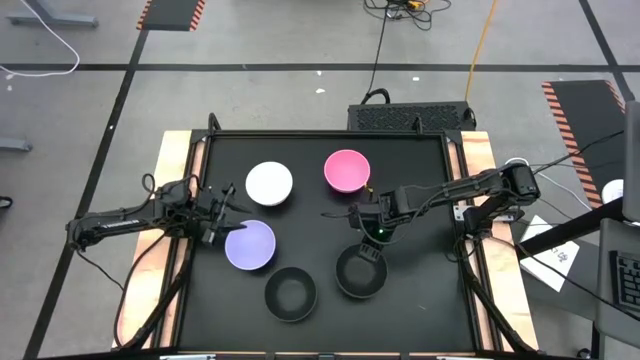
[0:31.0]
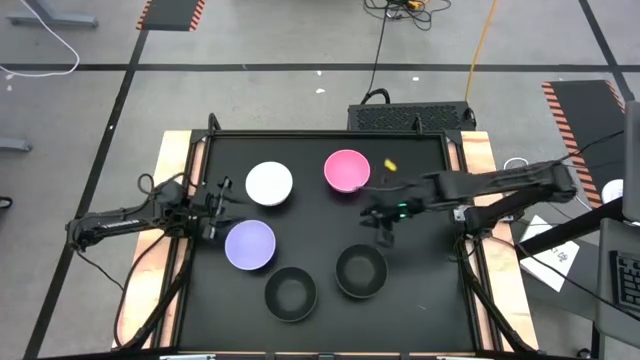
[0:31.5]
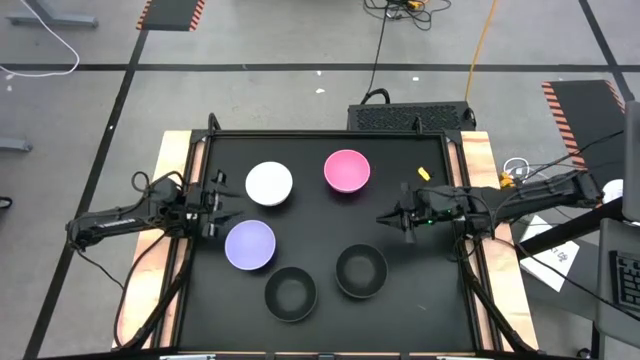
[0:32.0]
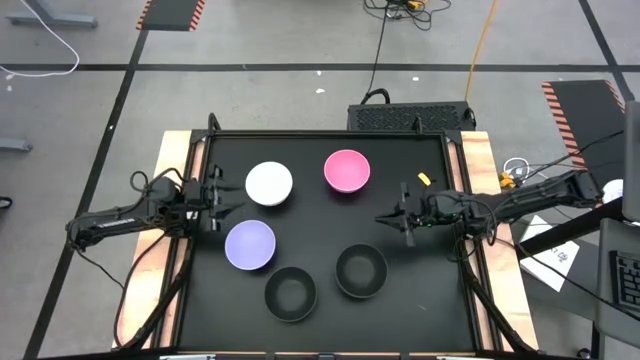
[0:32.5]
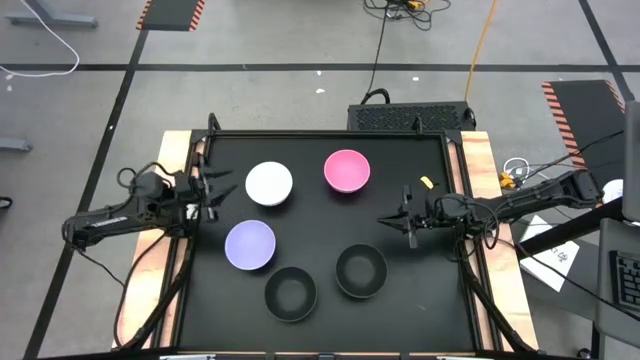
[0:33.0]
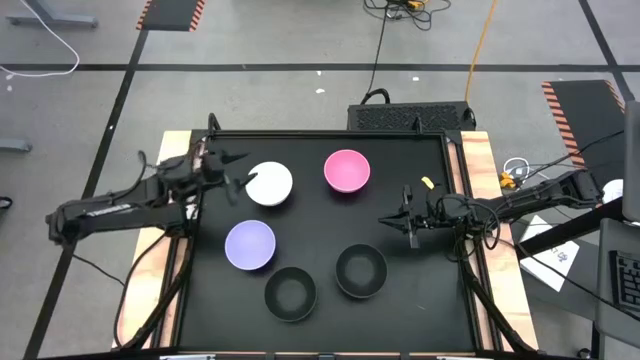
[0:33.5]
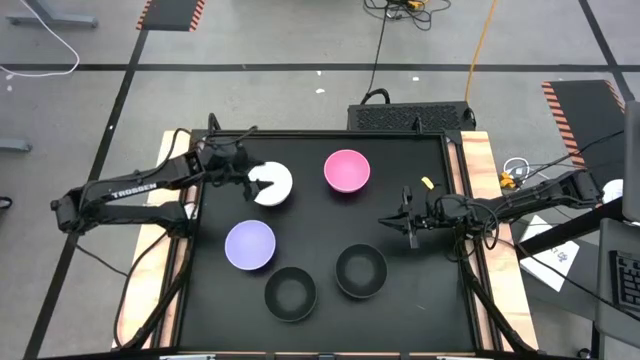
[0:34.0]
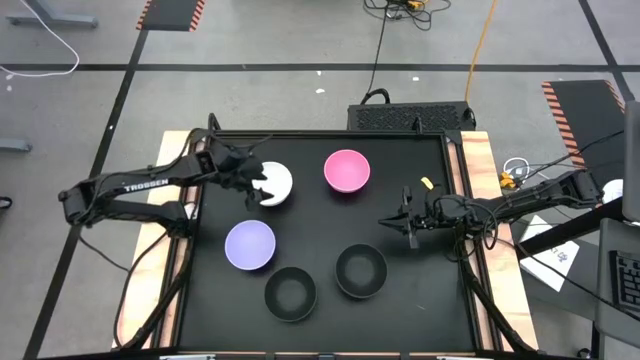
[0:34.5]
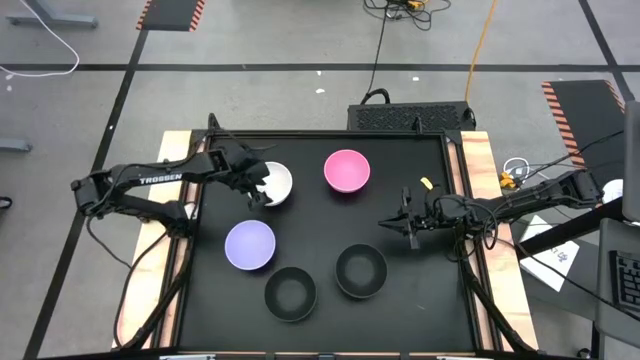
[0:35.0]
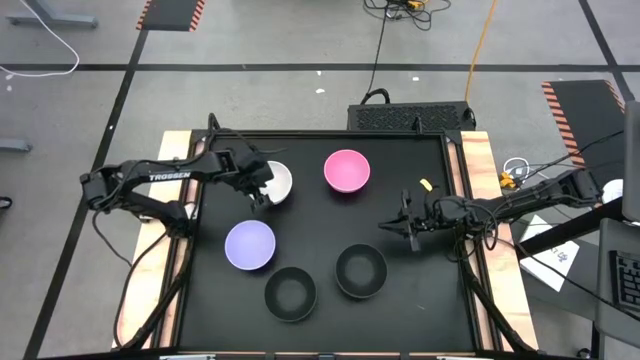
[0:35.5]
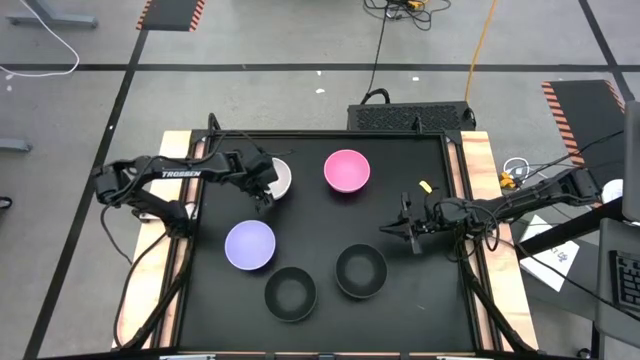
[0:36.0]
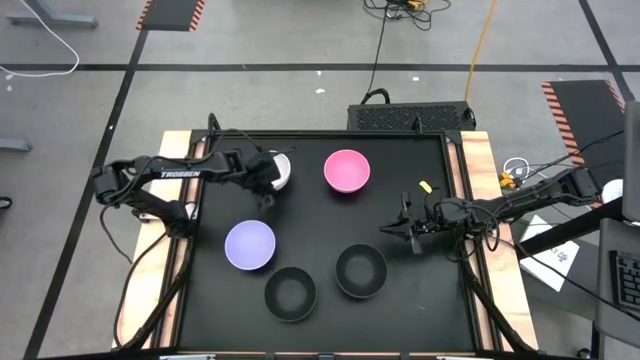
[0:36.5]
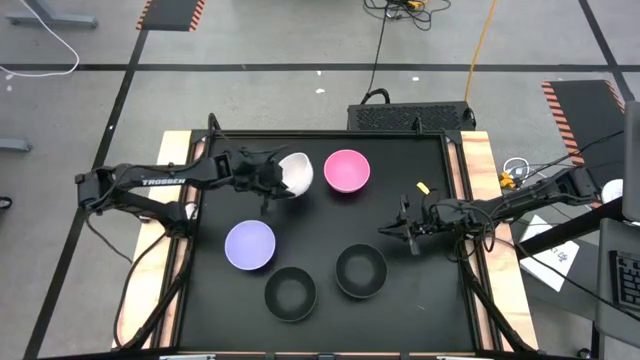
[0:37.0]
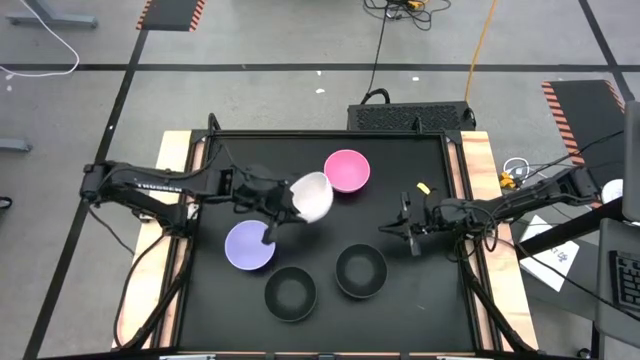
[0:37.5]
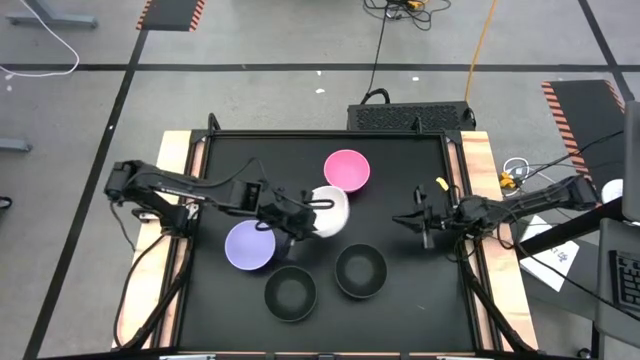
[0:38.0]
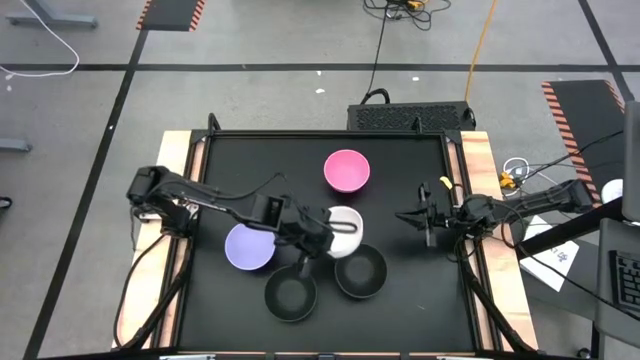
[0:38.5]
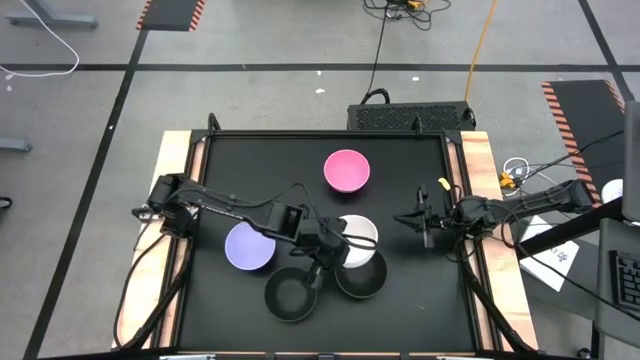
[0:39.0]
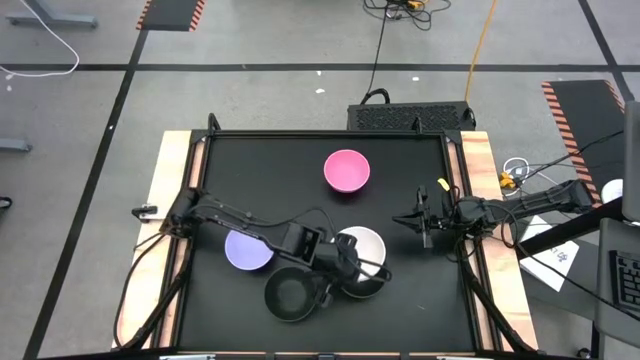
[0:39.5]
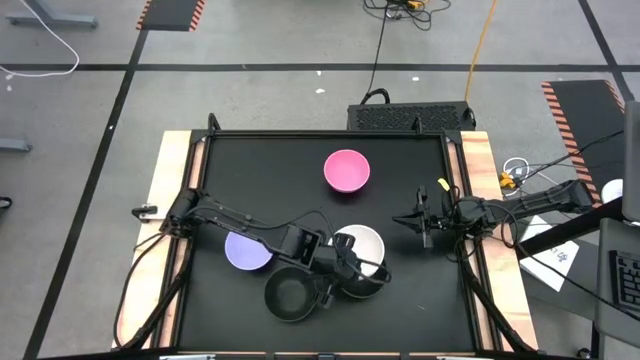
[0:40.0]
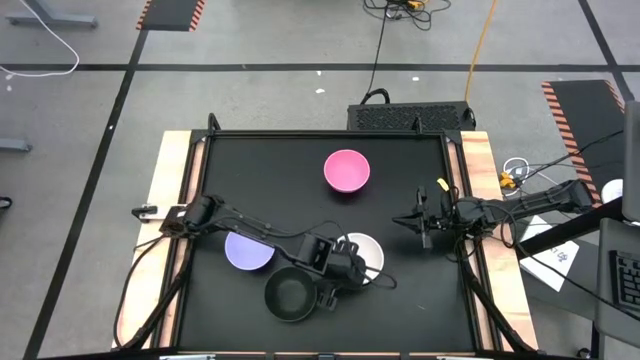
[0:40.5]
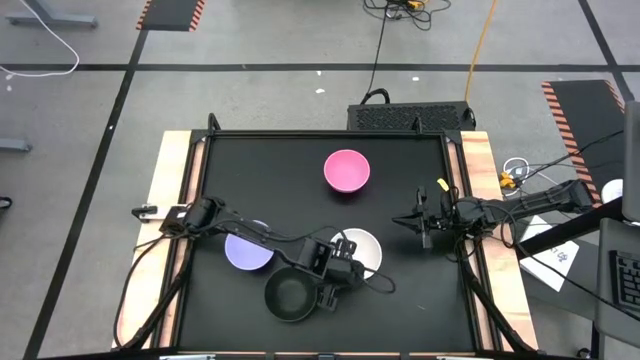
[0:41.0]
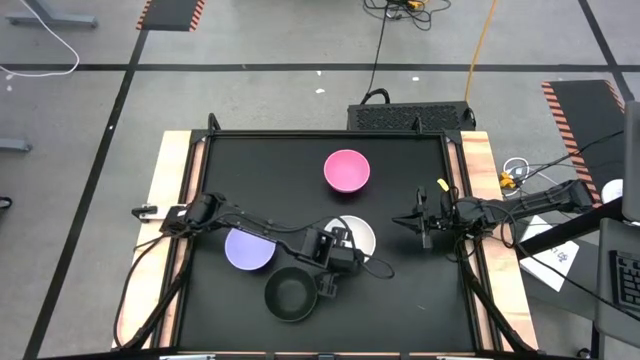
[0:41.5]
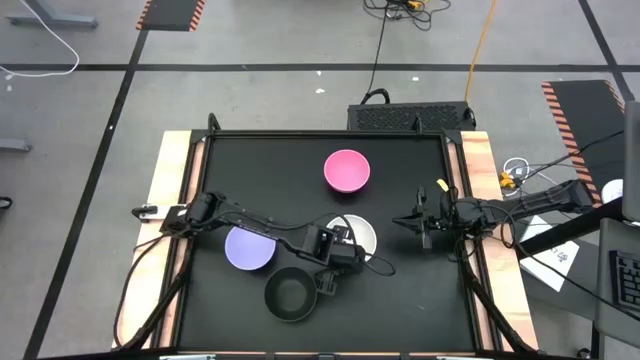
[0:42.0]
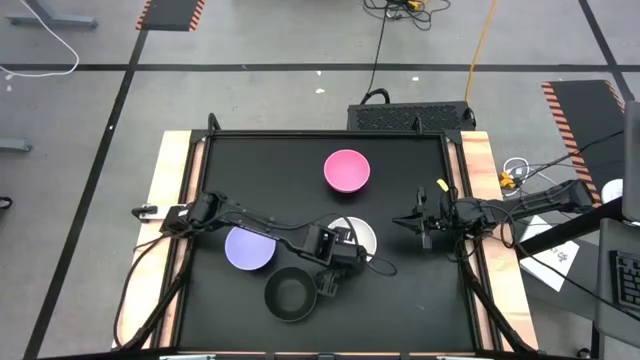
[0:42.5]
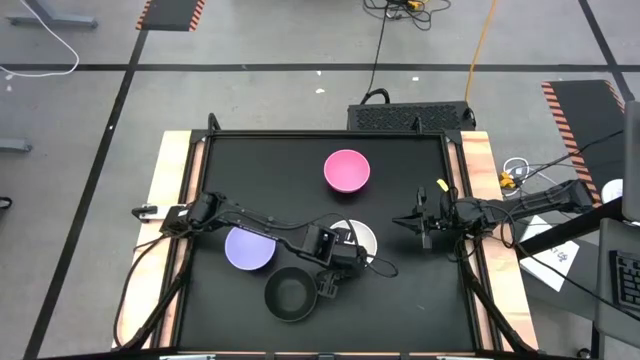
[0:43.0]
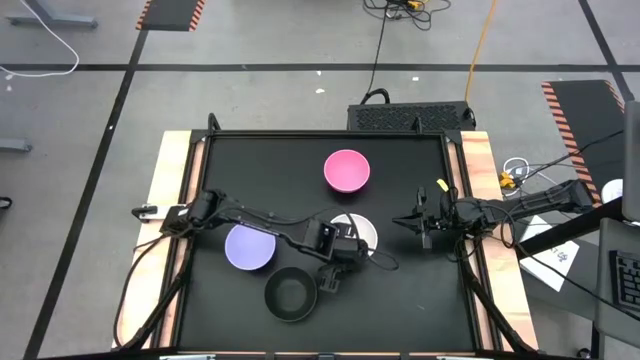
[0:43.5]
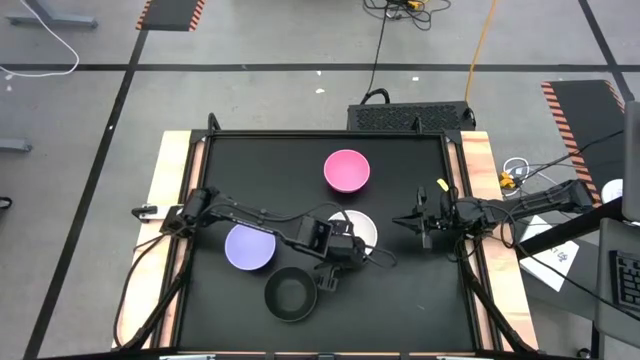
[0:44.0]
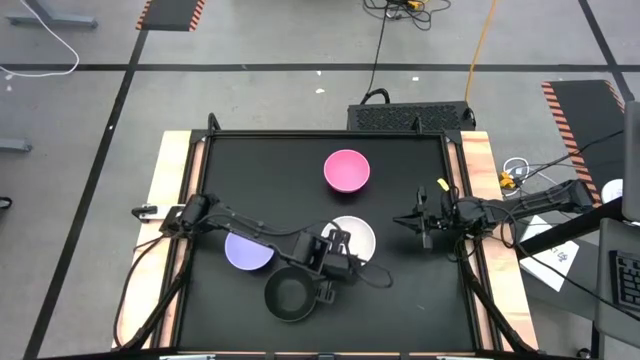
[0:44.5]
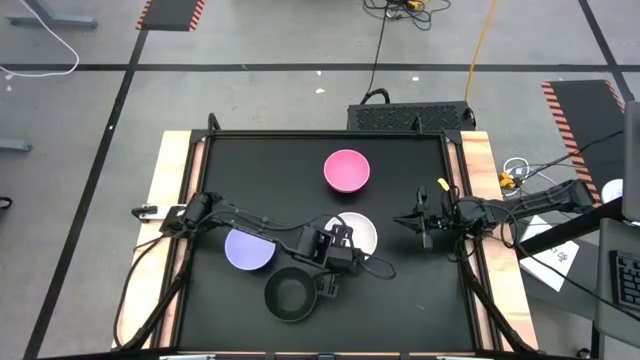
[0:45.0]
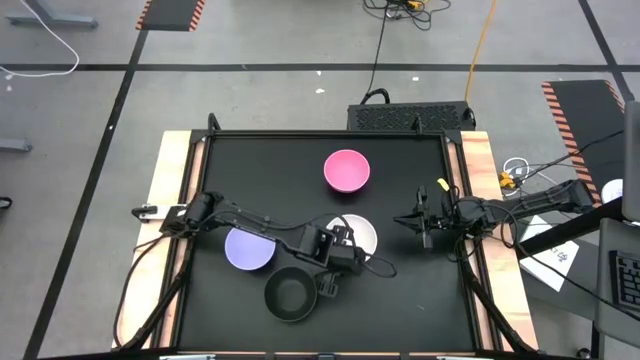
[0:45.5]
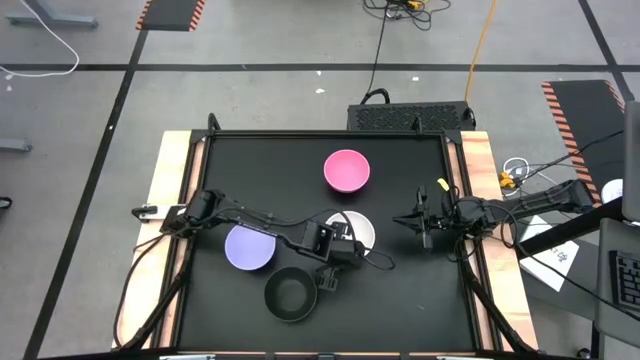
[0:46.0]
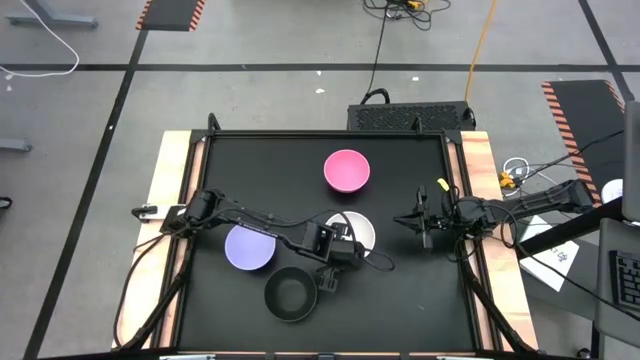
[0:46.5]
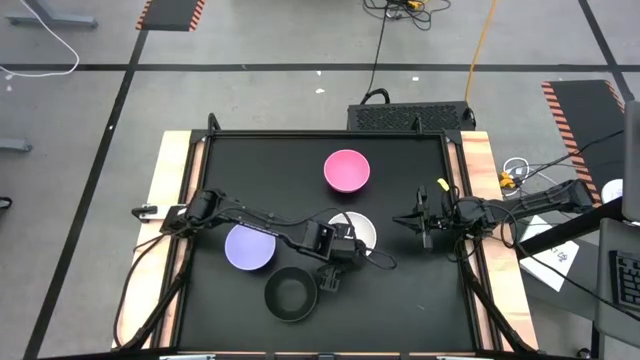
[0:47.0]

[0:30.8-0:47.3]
Task: Nest bowls inside each other
Stack the white bowl on the top of stacked black bowls on the table
